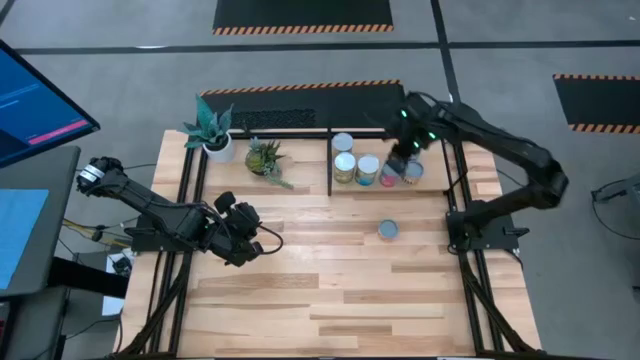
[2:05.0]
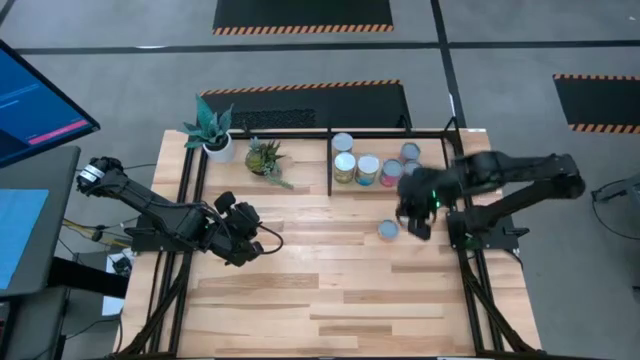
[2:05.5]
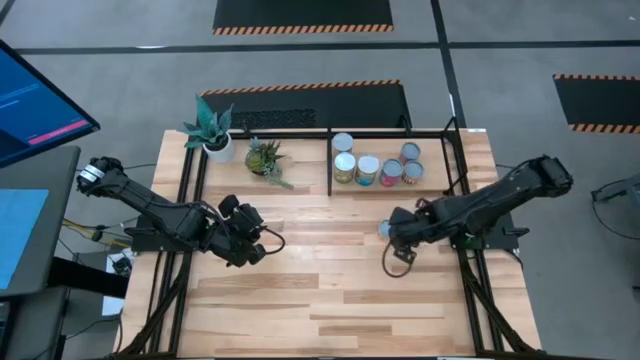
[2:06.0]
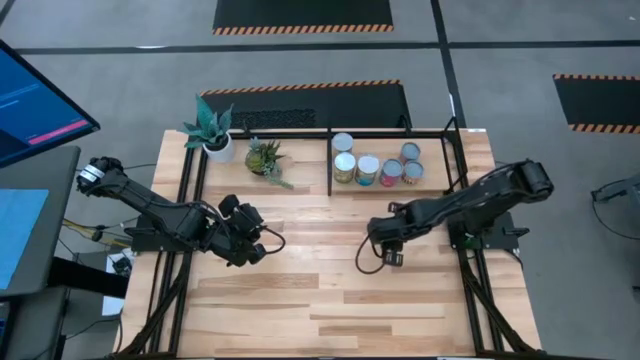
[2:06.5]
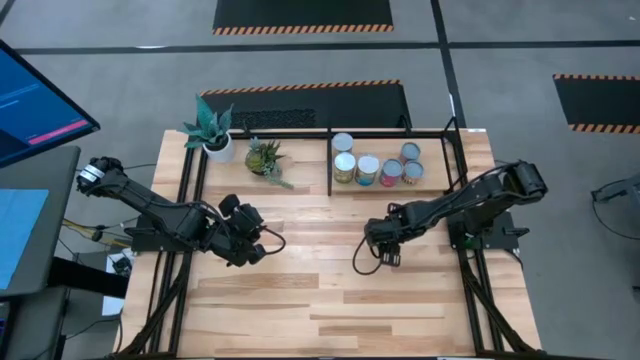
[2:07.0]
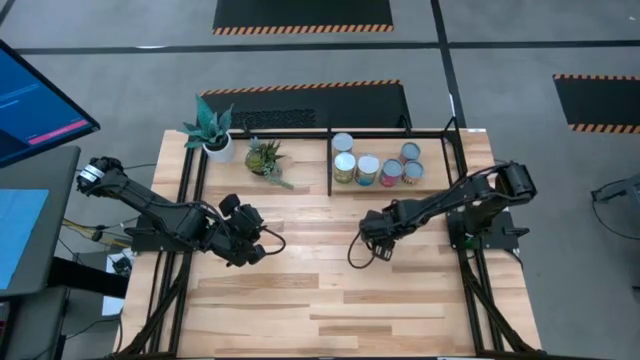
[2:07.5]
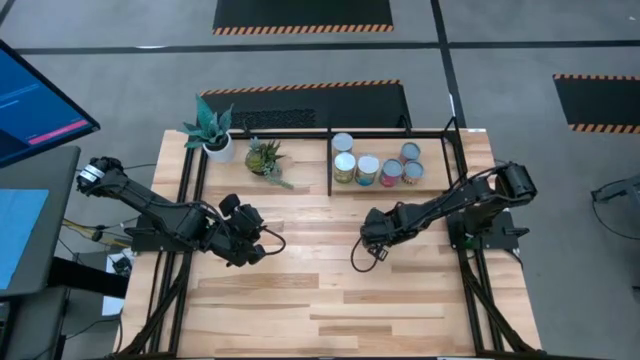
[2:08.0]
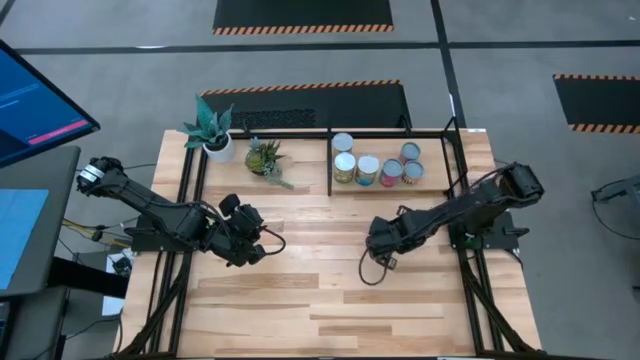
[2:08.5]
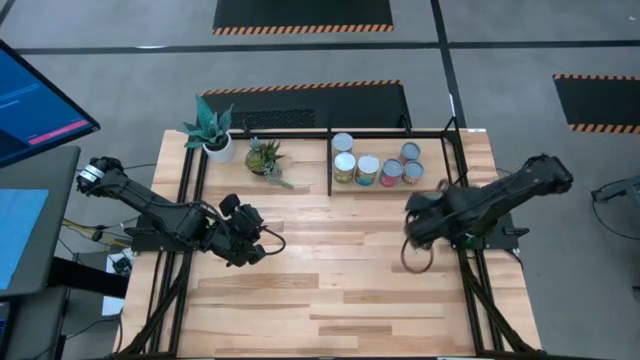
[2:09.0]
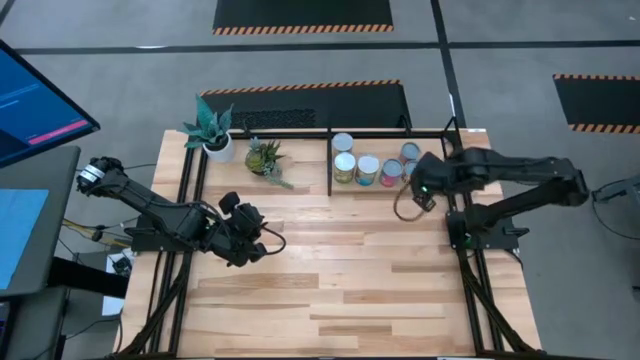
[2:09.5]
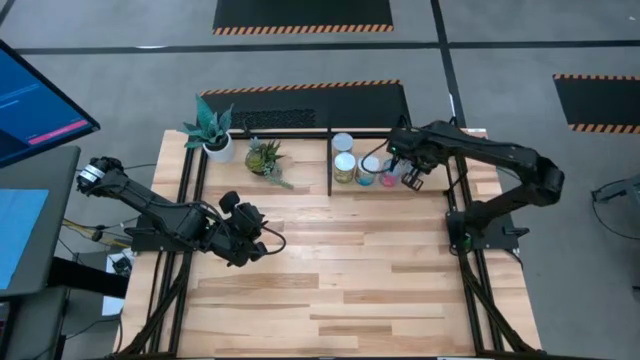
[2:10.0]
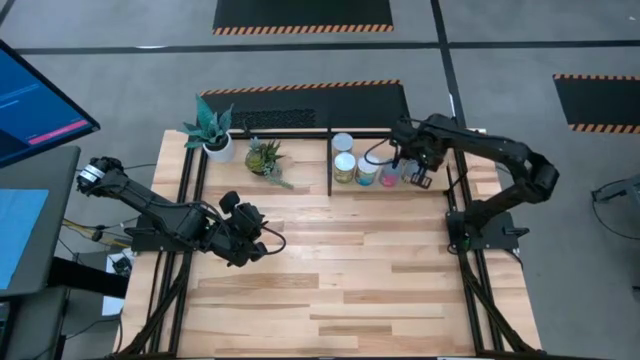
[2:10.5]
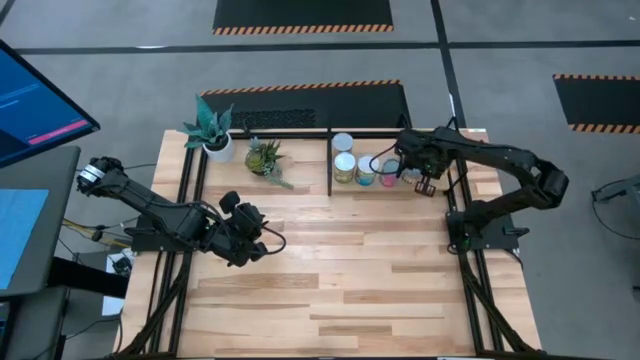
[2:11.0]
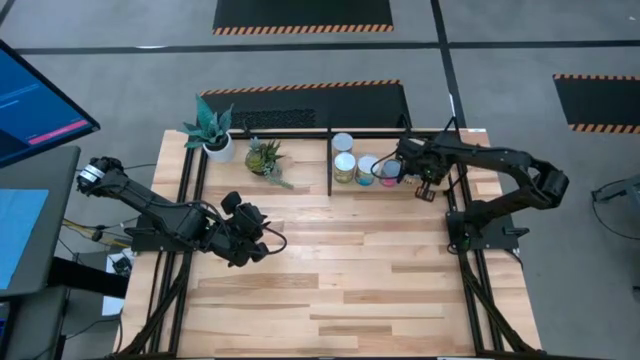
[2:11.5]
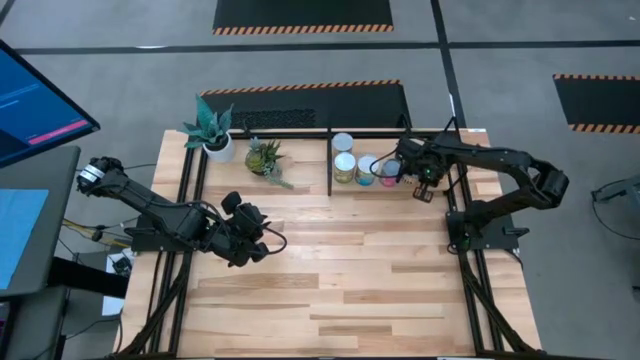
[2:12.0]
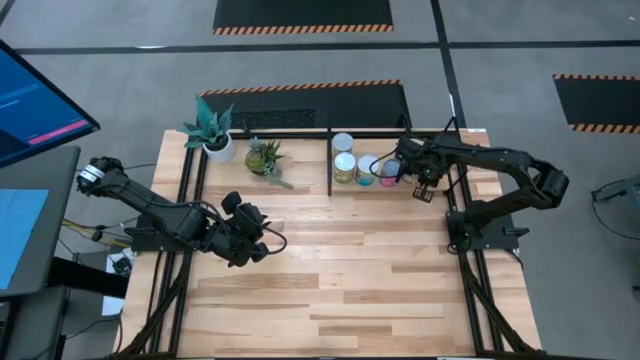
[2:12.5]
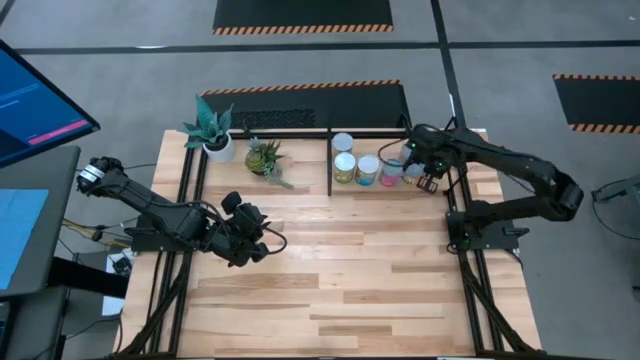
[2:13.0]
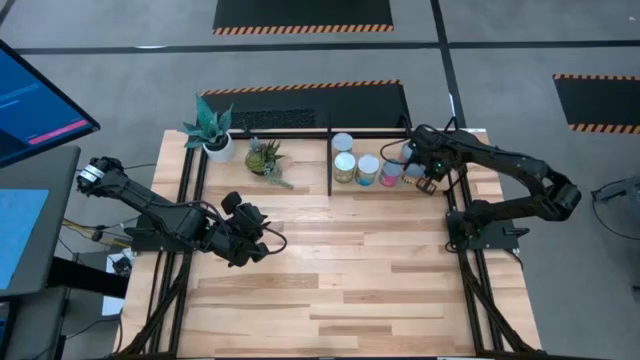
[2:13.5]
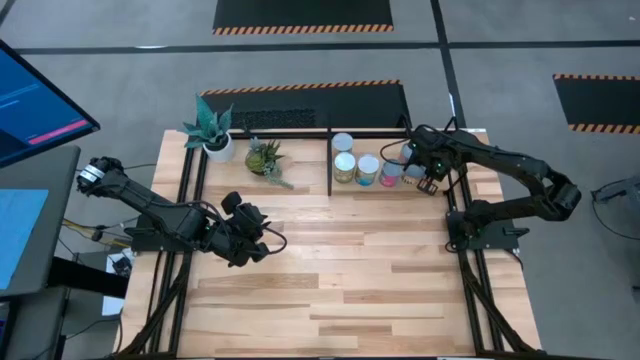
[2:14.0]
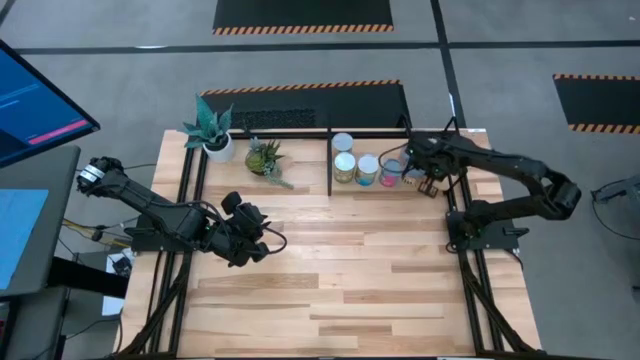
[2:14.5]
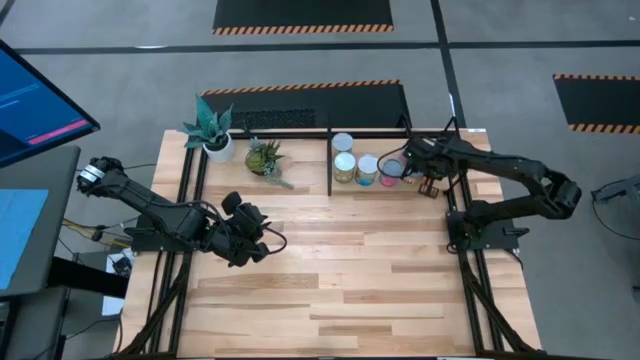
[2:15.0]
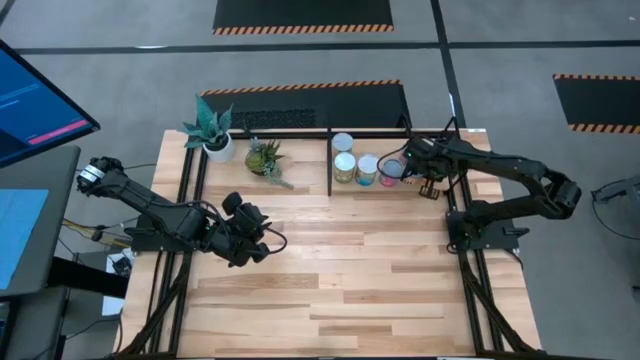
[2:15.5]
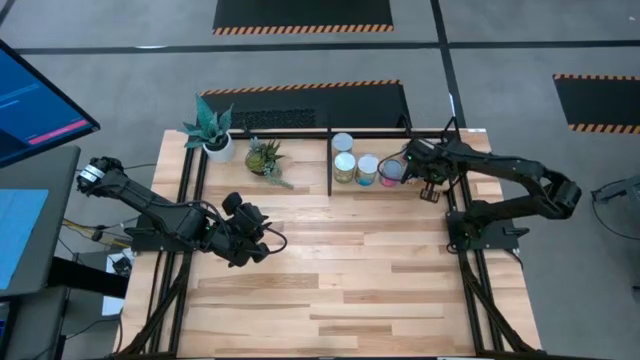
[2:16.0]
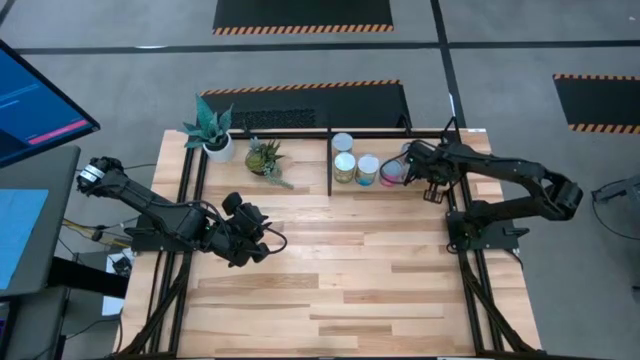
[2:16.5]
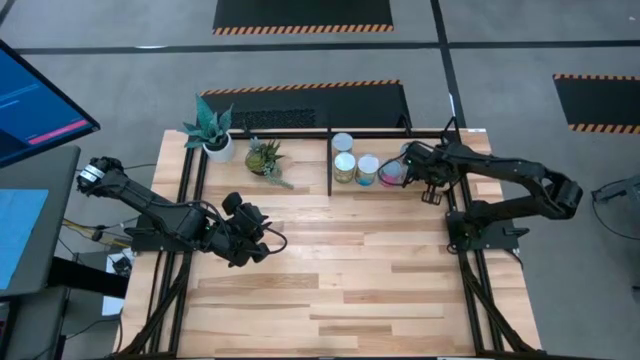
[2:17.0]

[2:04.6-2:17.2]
Task: Pick and place cans onto a shelf
Put the canned pineapple on the shelf

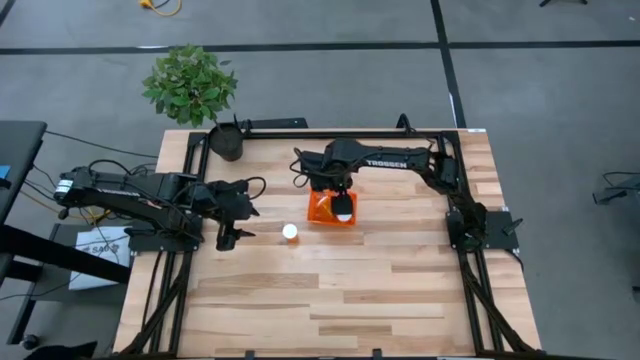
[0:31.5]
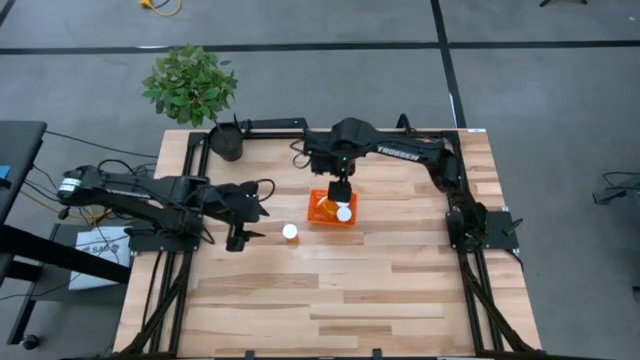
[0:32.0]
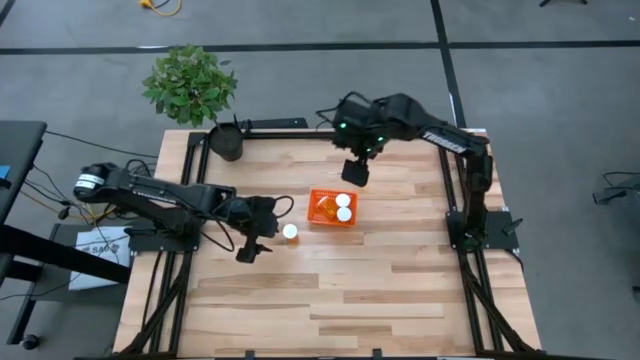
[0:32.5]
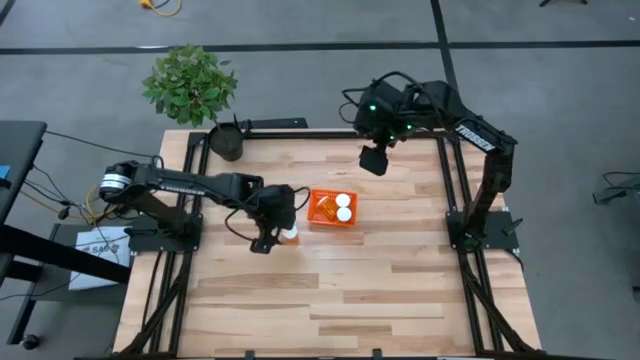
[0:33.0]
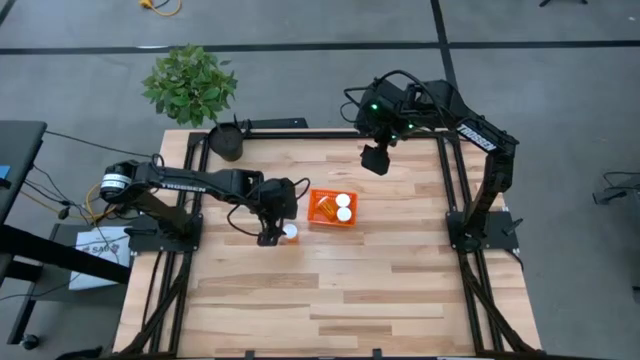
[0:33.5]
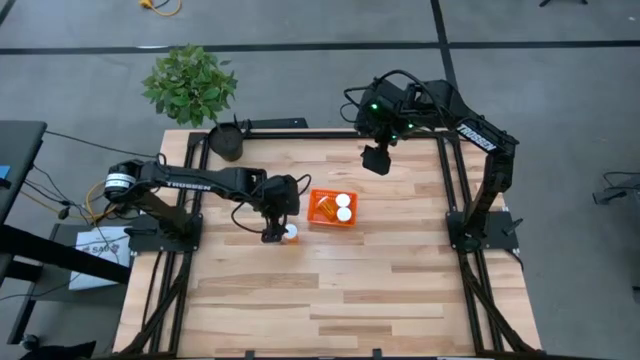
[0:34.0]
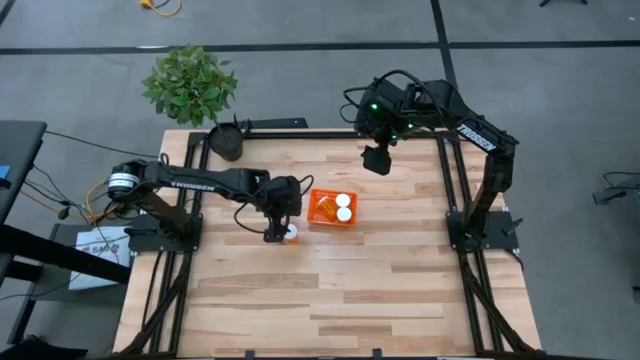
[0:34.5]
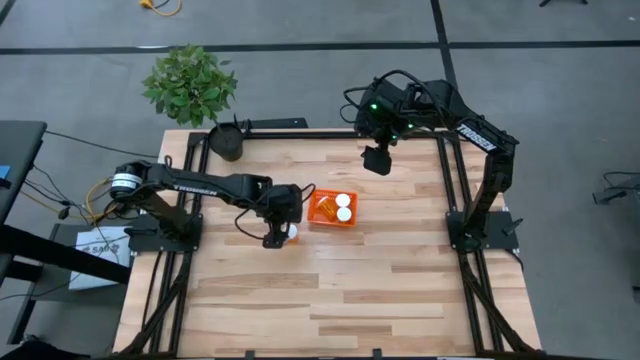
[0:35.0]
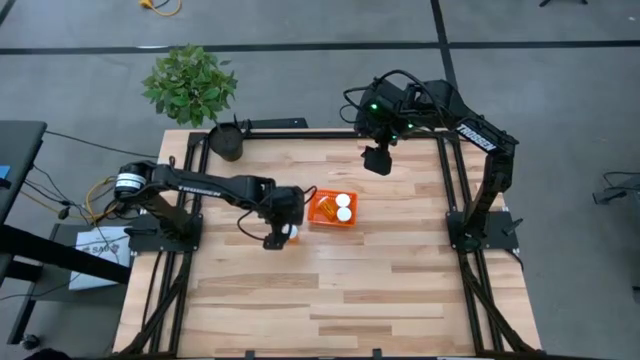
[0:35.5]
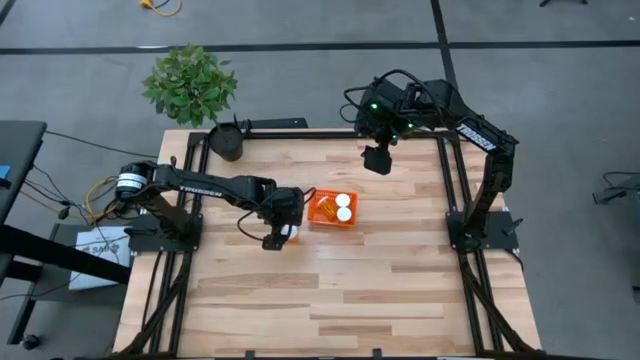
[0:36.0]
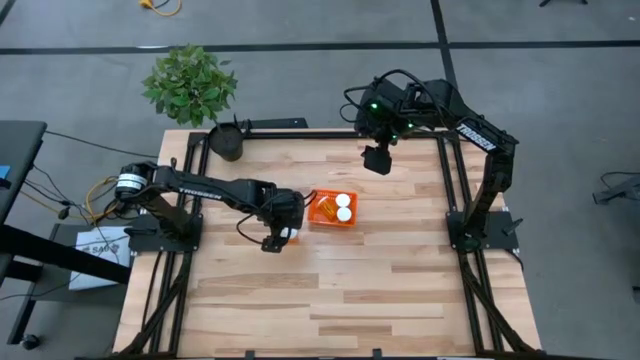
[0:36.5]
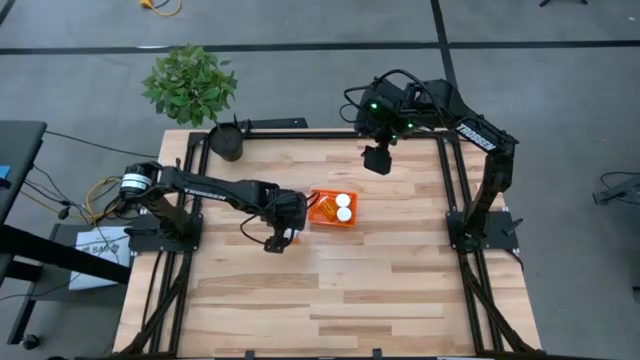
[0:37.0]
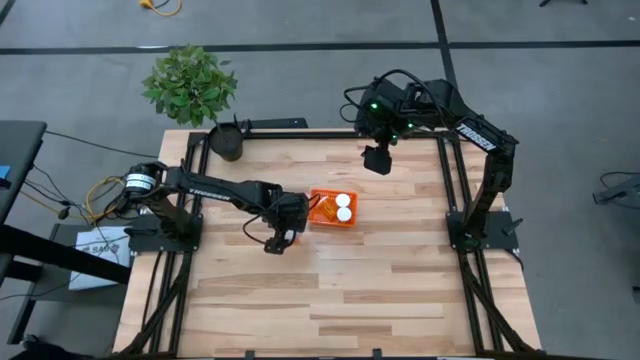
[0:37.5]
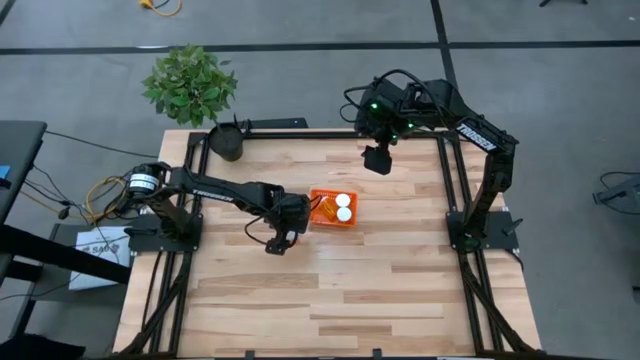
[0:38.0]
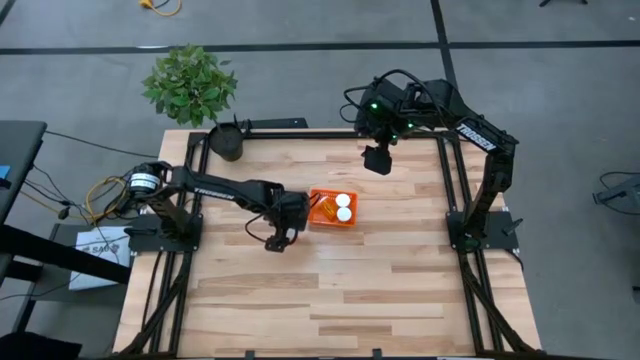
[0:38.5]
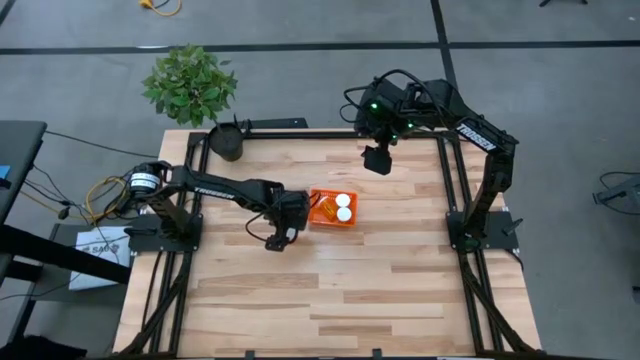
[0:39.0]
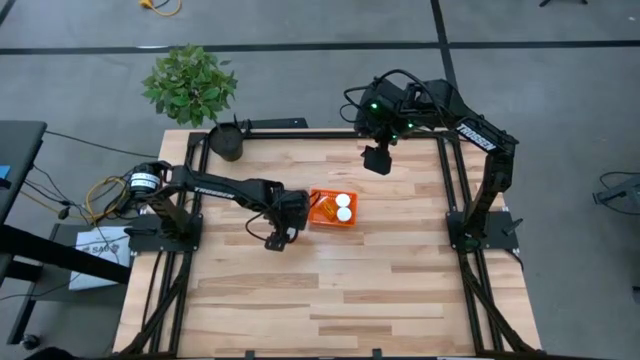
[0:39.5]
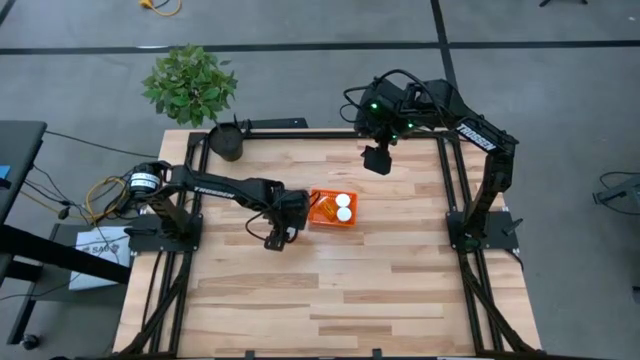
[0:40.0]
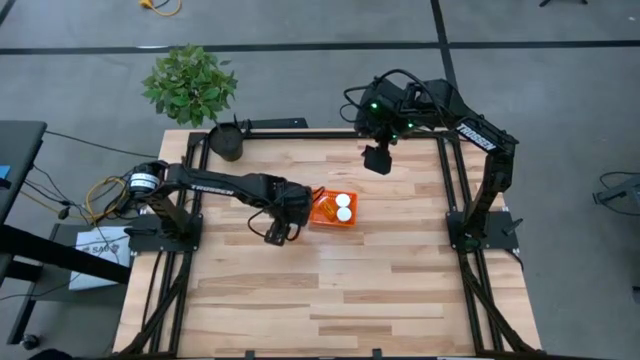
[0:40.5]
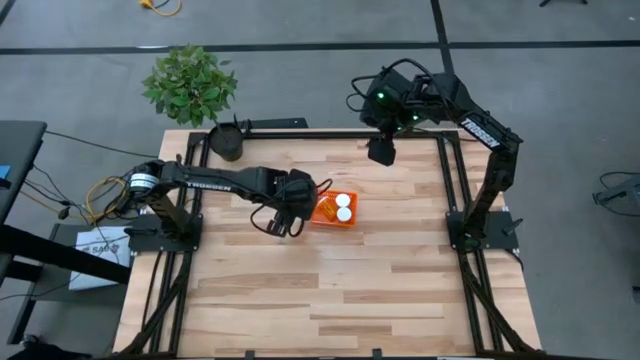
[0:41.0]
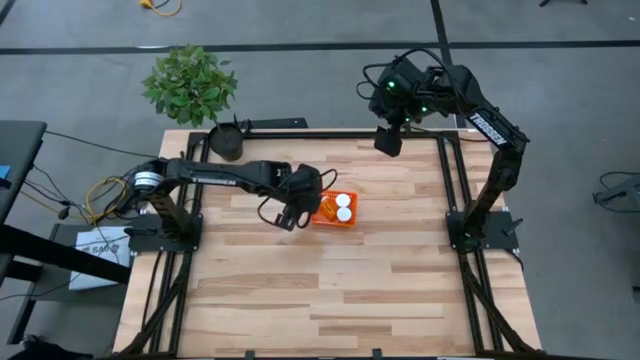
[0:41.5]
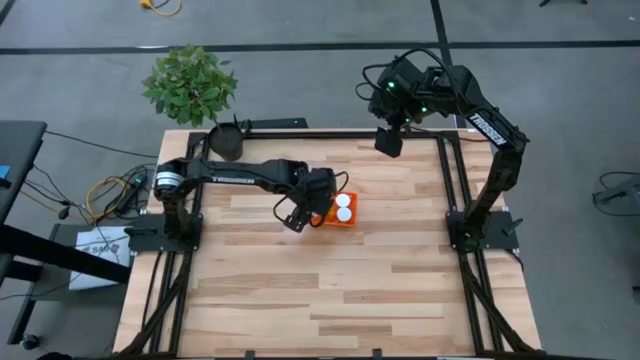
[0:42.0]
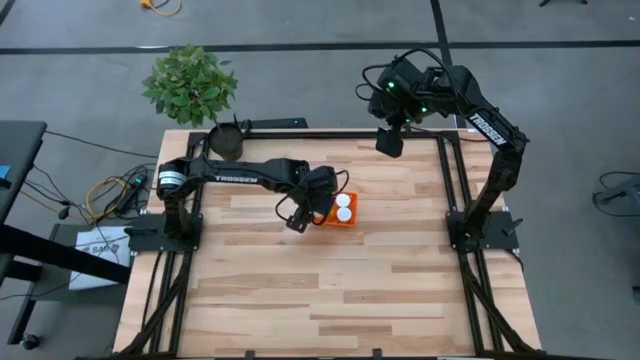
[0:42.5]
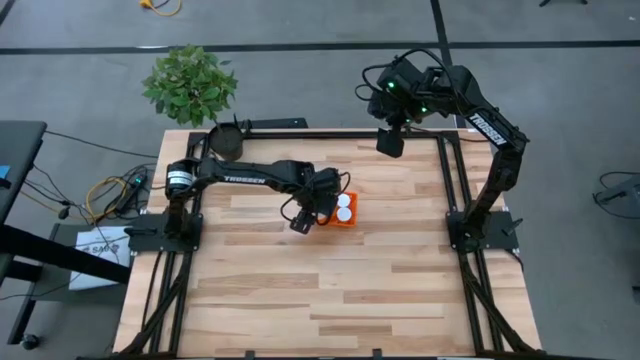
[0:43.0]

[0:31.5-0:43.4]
Task: Pick and place pill bottles into a basket
Put the orange pill bottle into the orange basket
